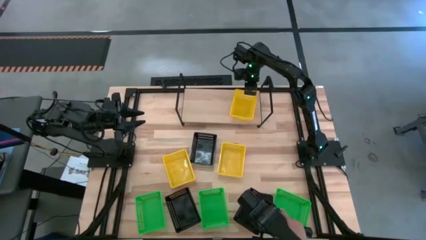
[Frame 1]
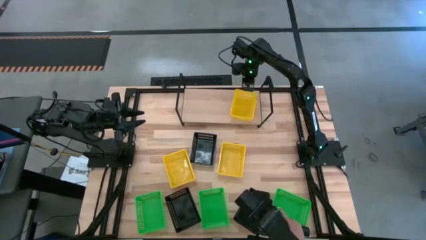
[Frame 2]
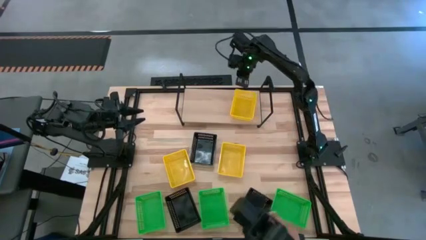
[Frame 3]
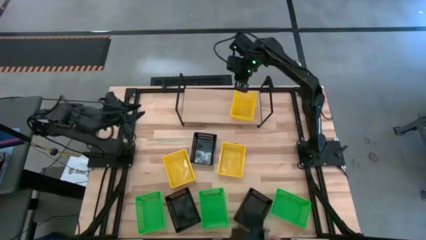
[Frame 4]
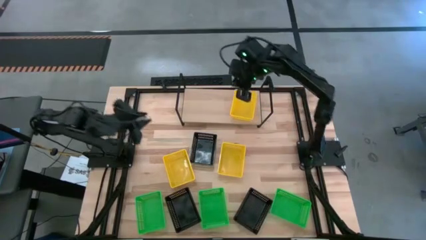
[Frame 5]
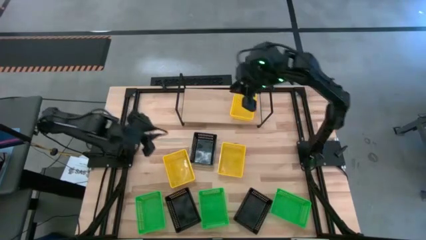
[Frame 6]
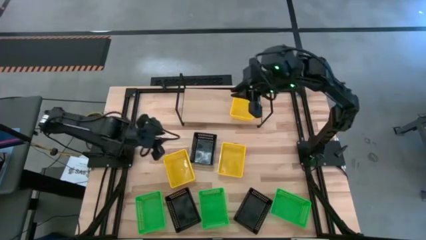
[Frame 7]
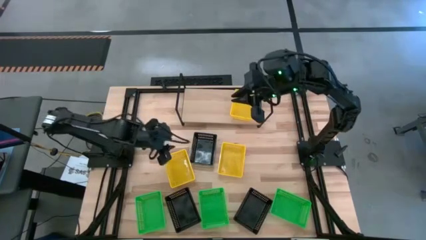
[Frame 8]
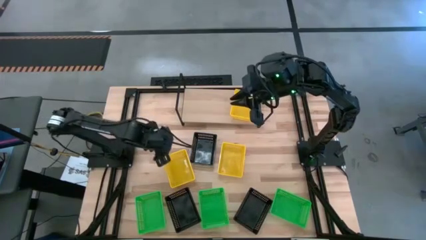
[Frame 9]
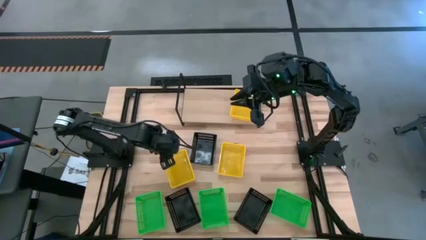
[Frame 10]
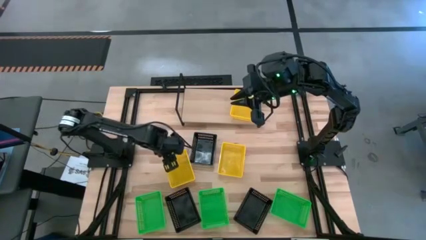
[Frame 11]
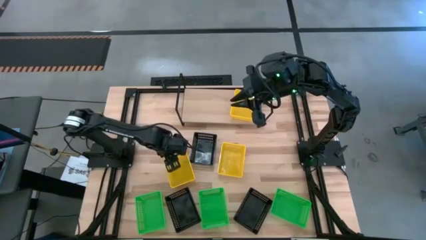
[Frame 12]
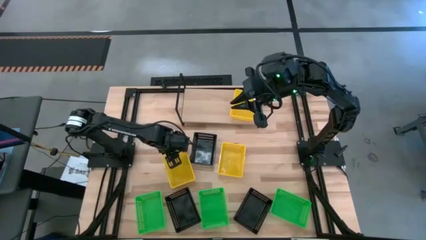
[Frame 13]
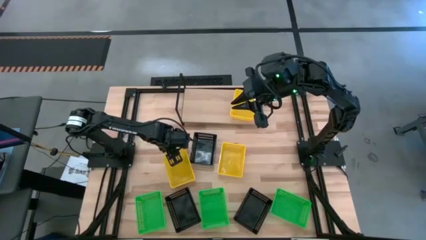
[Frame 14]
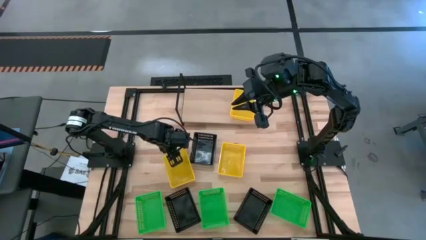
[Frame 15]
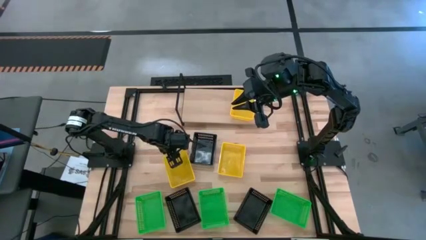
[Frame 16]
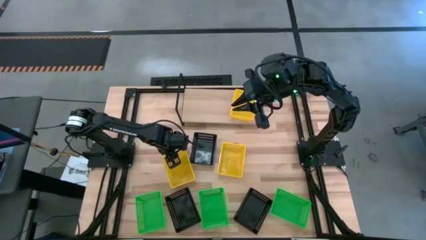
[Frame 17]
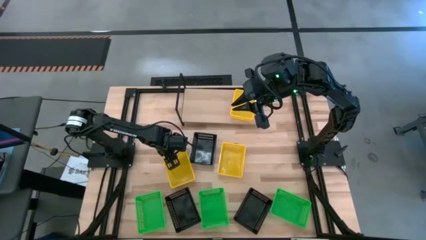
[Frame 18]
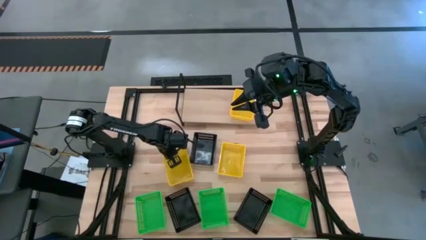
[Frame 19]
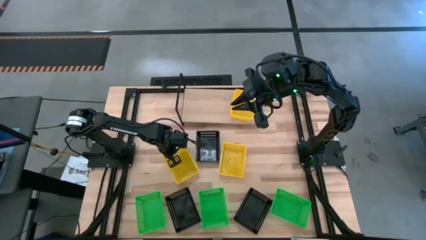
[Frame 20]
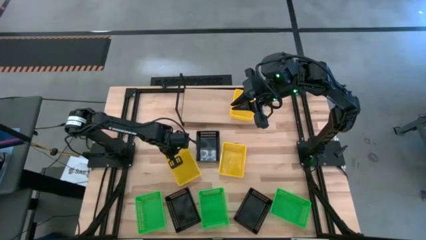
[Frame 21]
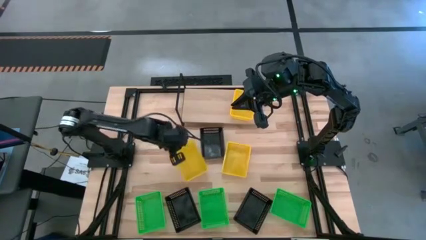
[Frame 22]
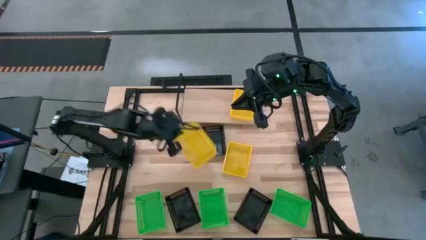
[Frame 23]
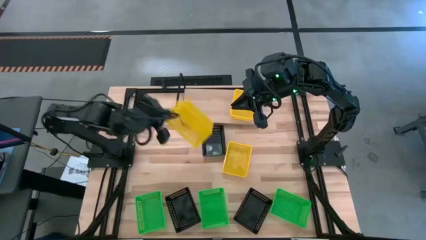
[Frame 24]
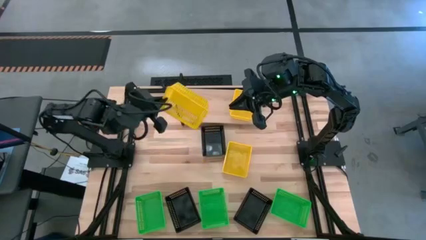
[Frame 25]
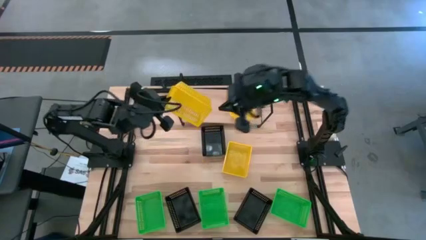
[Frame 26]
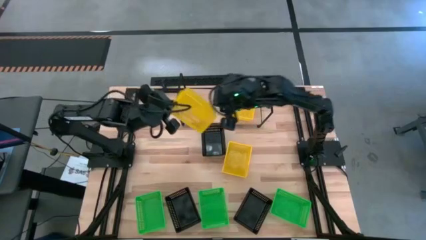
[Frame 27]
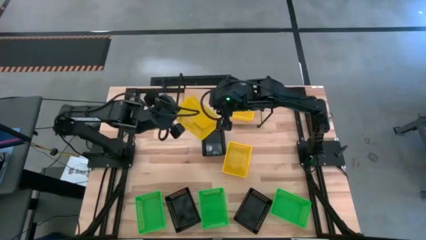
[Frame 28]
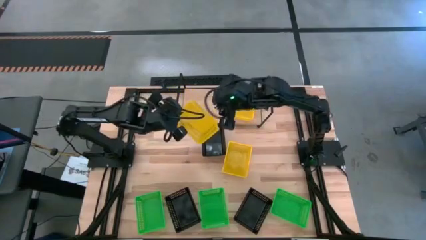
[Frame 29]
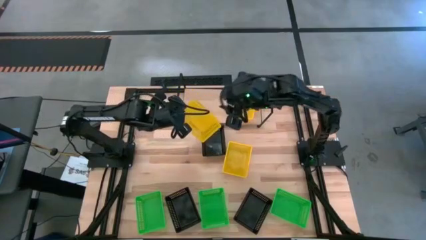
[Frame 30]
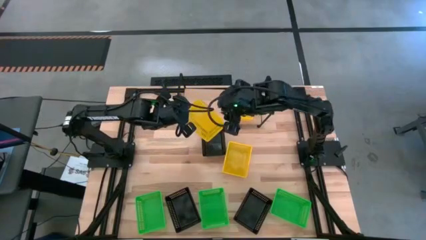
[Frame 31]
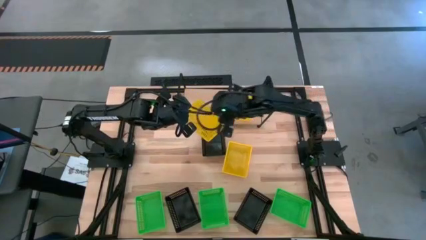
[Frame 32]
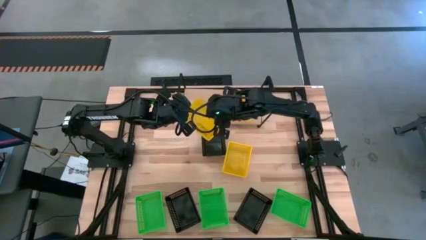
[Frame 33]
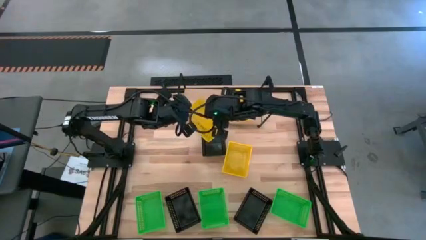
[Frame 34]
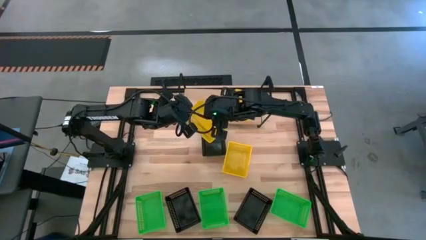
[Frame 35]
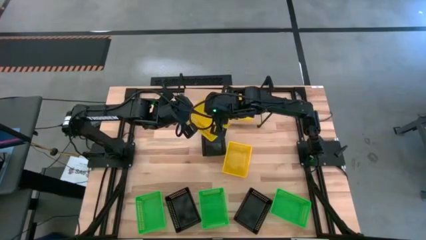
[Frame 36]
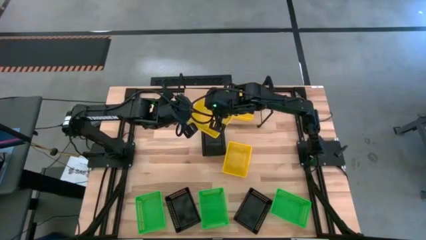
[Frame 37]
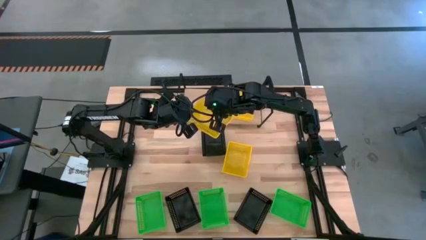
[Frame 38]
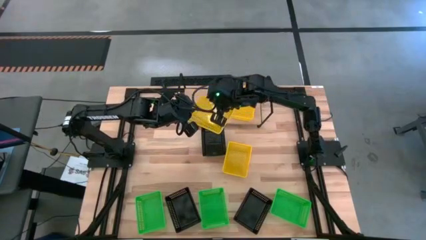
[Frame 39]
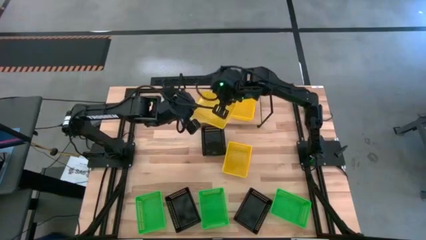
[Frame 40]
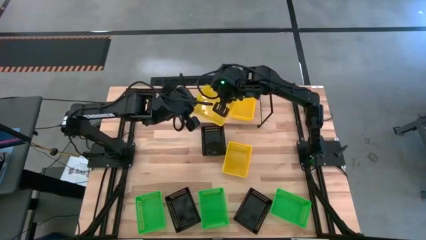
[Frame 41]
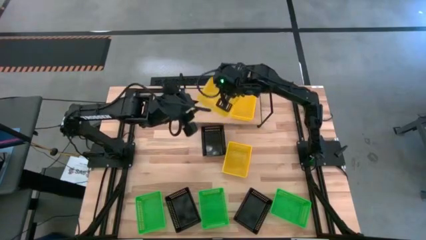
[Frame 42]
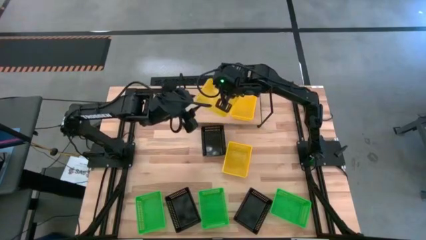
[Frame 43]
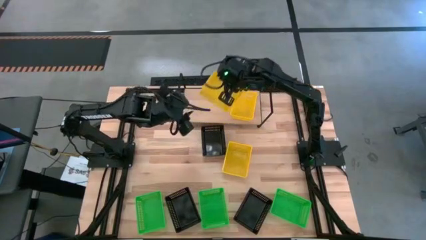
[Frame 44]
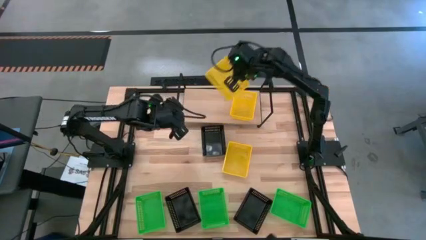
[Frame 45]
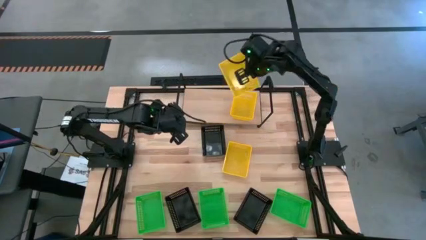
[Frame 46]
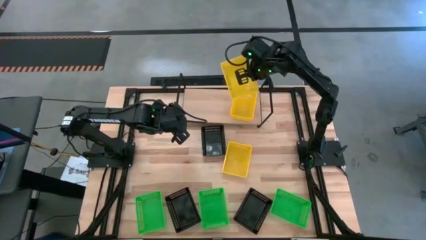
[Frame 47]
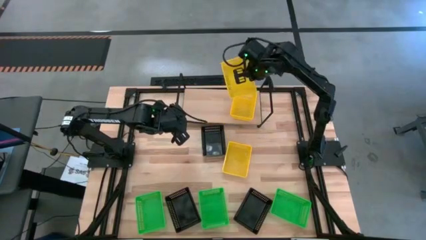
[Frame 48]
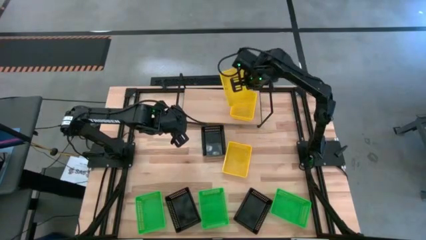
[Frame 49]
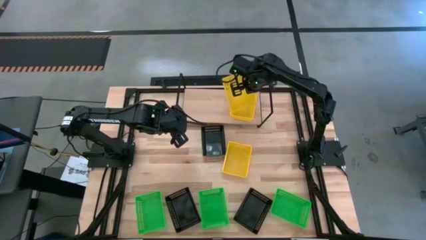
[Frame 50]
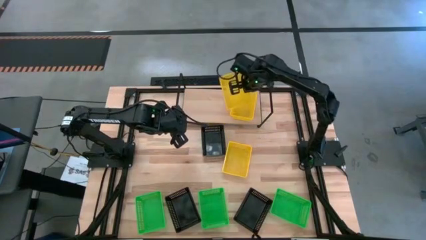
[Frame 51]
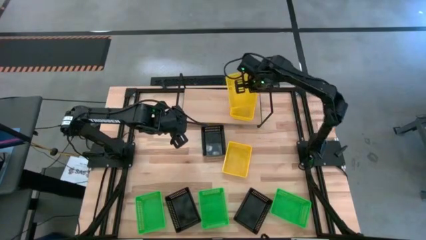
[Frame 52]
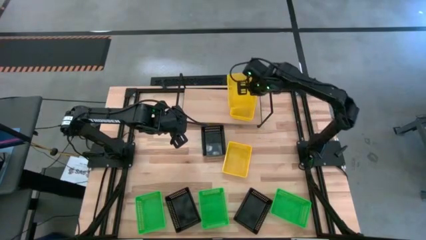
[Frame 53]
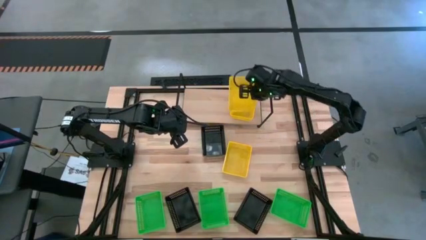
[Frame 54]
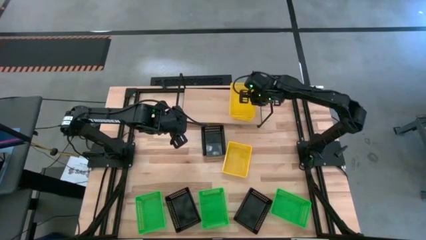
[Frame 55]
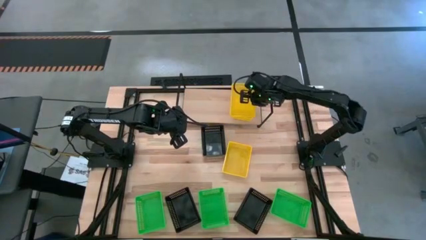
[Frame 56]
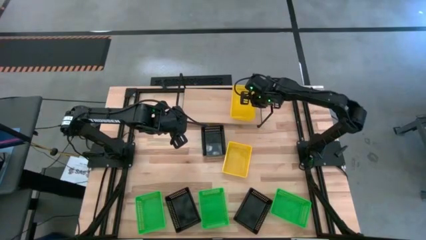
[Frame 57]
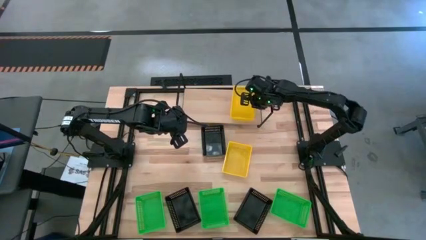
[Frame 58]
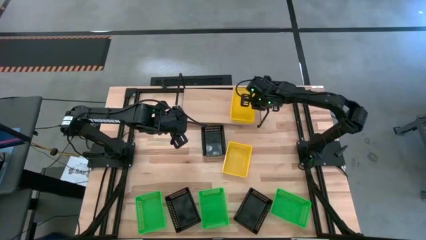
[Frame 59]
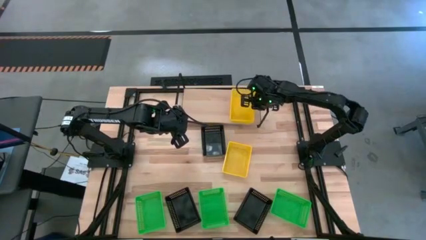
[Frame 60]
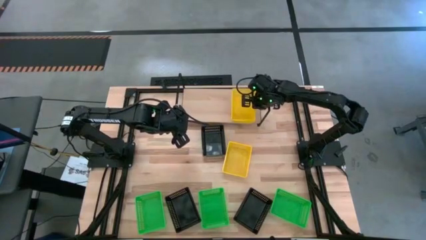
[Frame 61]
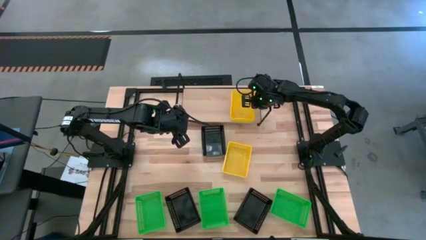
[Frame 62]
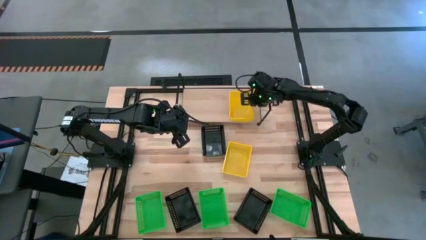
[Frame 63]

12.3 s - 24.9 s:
Task: Stack baskets on shelf by color
Stack the left yellow bin on top of the yellow bin

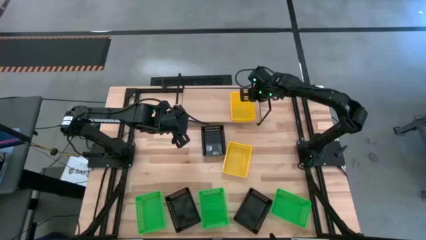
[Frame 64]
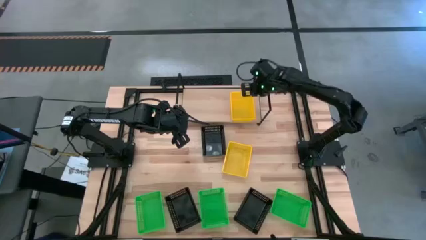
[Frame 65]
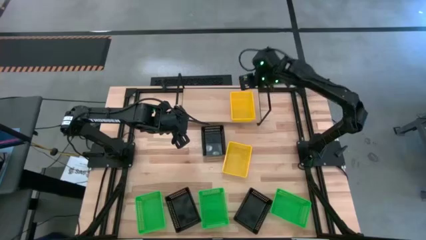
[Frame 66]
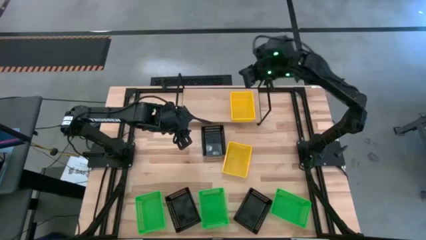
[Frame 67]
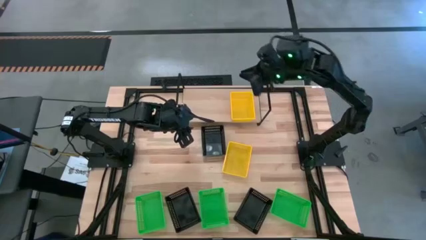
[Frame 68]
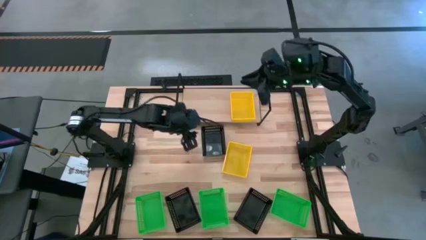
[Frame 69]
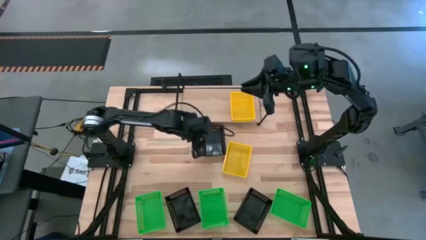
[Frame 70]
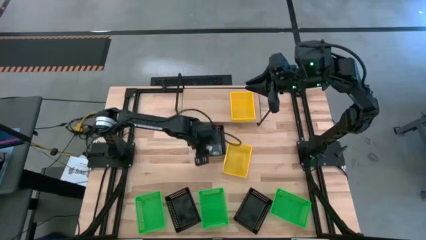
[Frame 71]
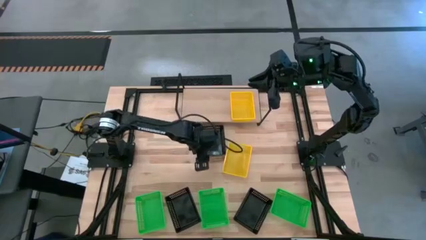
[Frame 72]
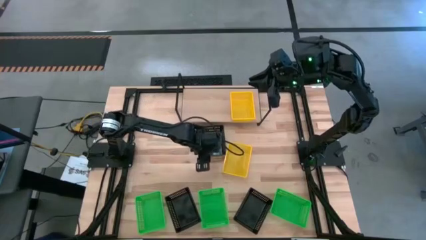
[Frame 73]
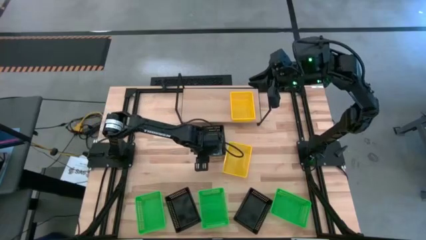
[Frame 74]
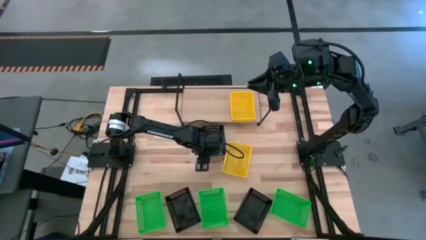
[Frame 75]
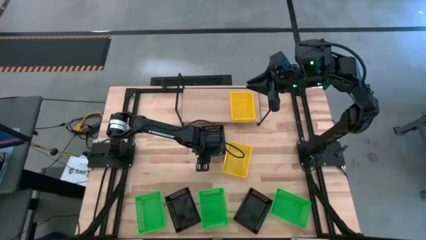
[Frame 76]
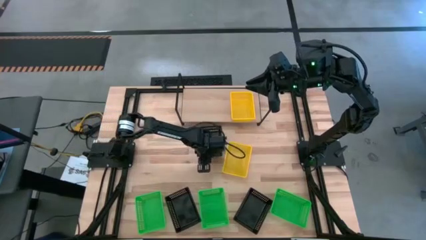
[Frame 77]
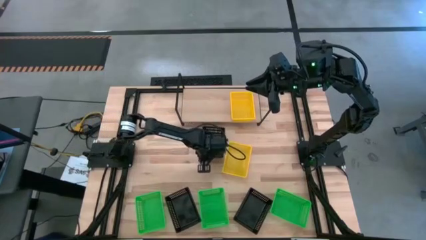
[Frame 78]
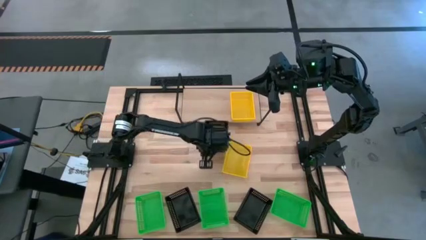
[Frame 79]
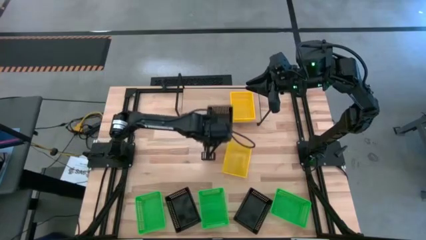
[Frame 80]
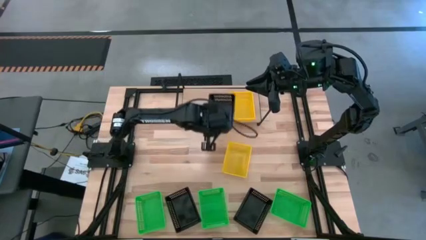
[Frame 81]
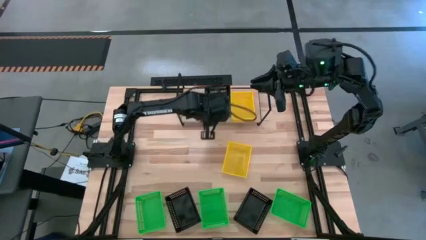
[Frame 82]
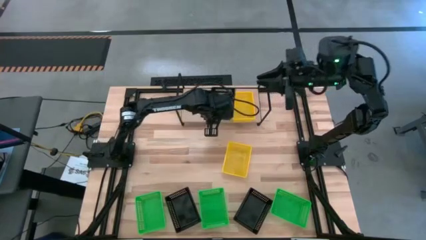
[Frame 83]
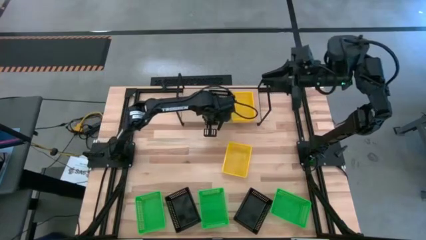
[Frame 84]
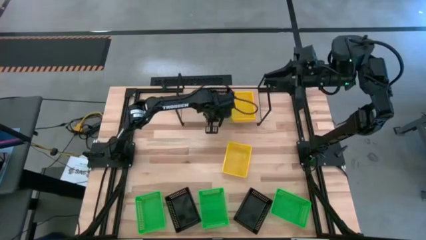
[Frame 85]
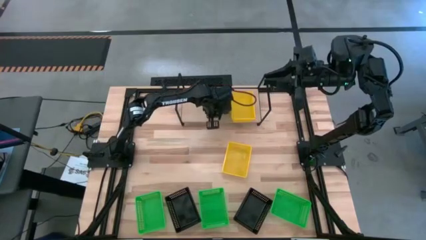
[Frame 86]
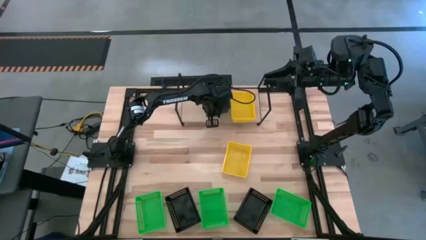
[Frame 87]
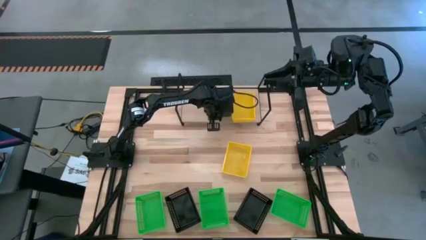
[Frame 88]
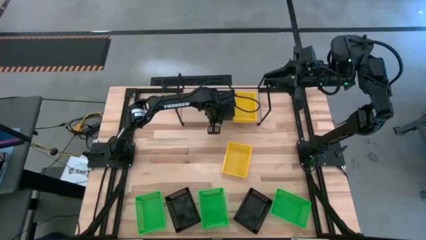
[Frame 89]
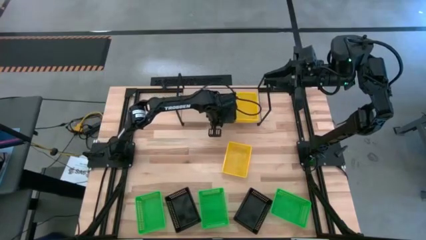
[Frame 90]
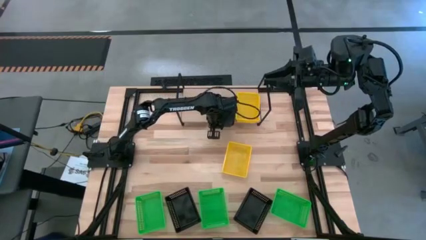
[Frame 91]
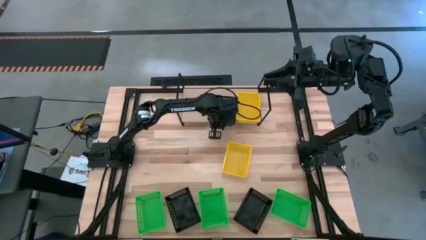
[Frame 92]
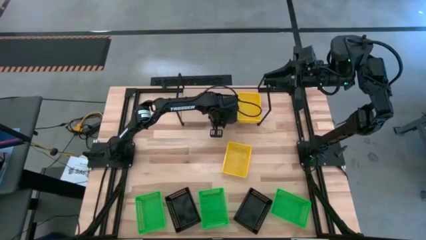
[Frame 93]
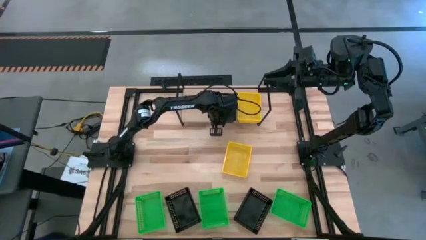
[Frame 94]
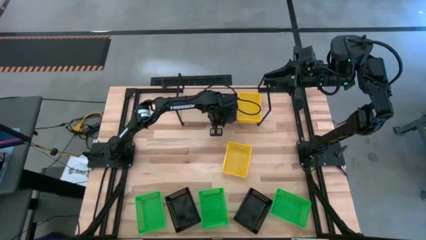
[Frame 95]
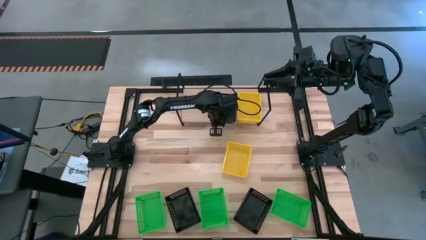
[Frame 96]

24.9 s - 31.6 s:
Put the top center black bin on the shelf
